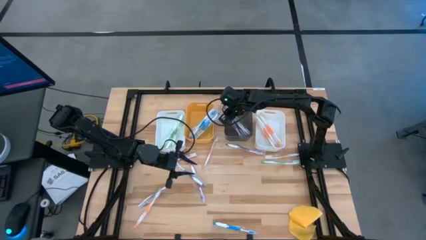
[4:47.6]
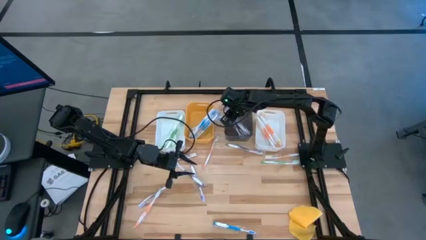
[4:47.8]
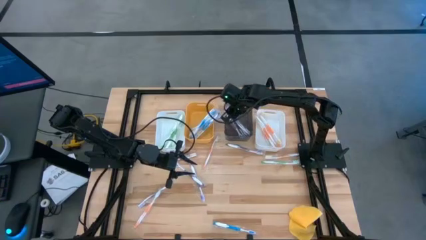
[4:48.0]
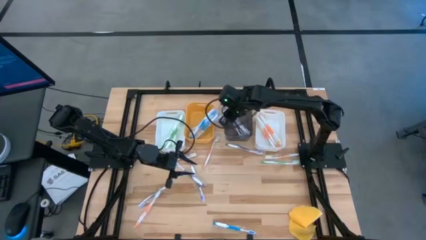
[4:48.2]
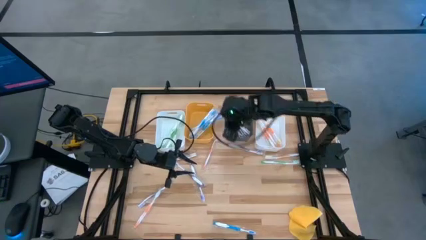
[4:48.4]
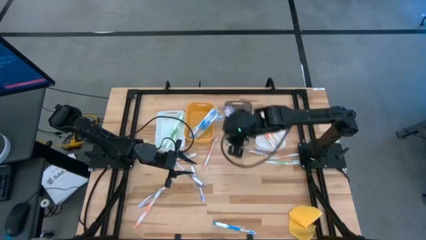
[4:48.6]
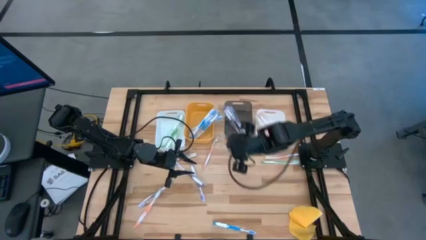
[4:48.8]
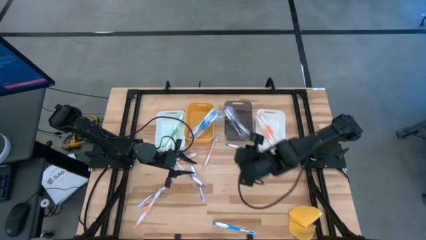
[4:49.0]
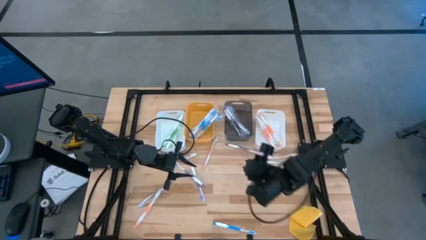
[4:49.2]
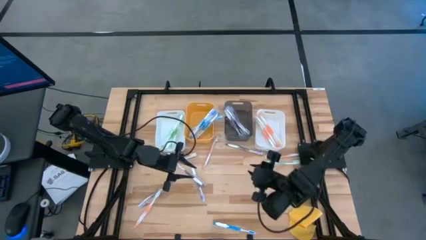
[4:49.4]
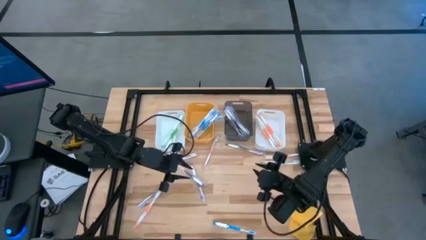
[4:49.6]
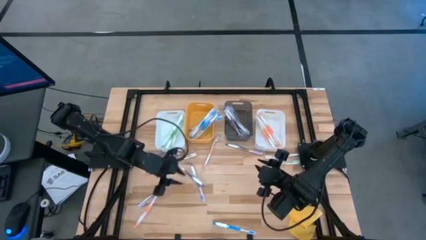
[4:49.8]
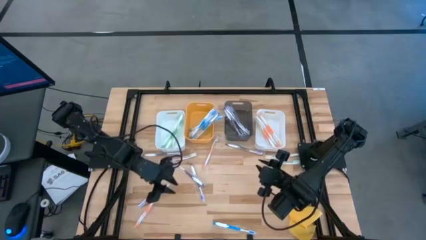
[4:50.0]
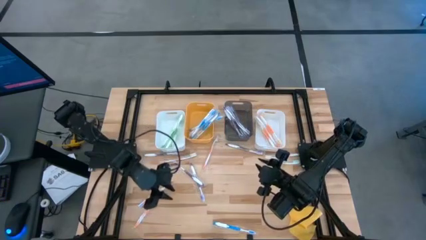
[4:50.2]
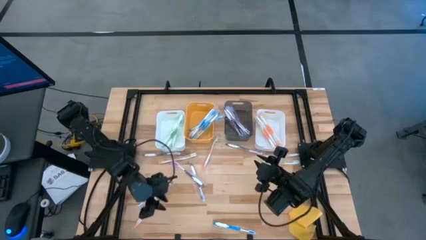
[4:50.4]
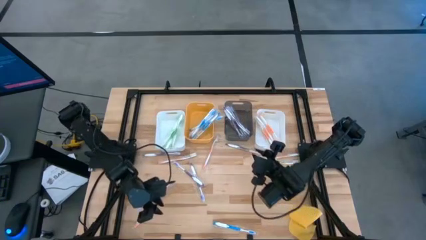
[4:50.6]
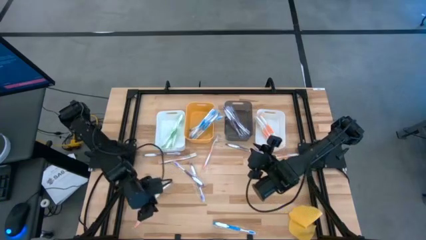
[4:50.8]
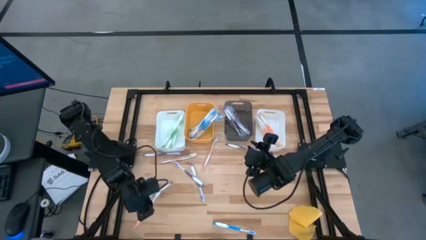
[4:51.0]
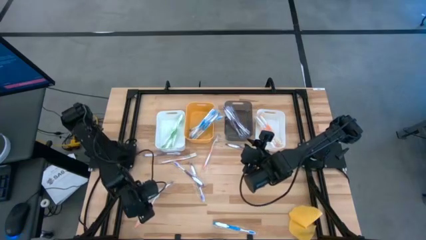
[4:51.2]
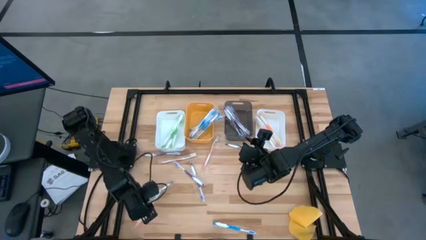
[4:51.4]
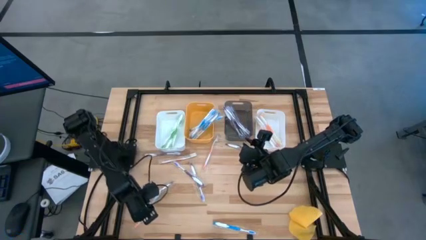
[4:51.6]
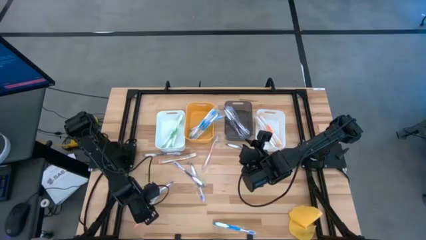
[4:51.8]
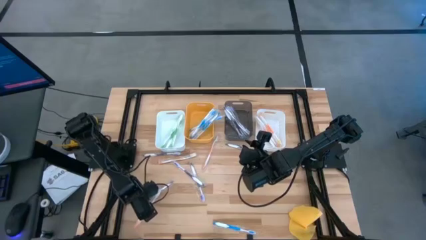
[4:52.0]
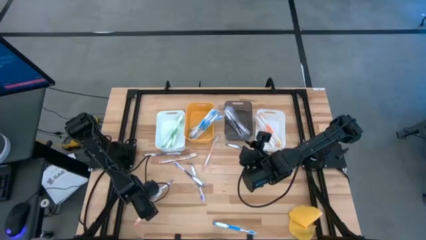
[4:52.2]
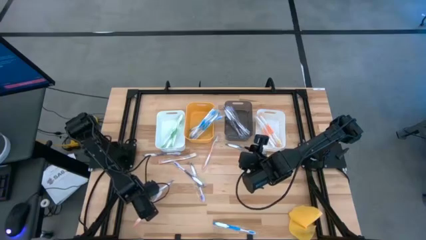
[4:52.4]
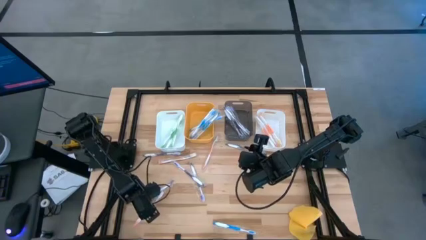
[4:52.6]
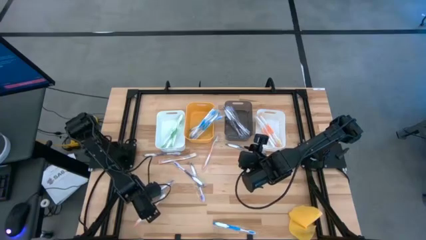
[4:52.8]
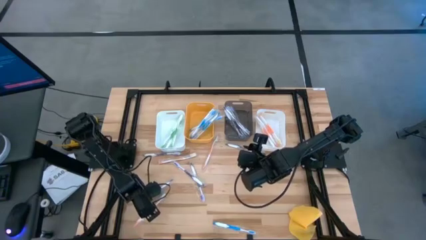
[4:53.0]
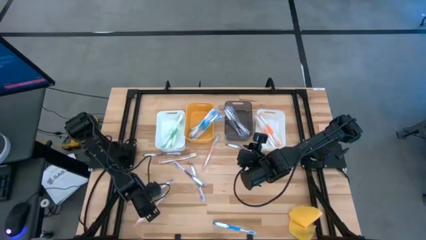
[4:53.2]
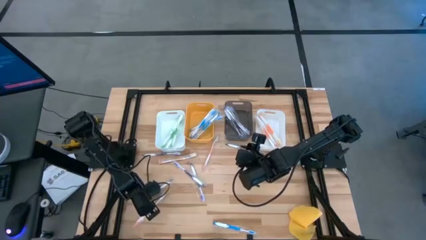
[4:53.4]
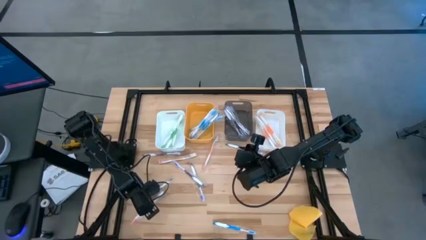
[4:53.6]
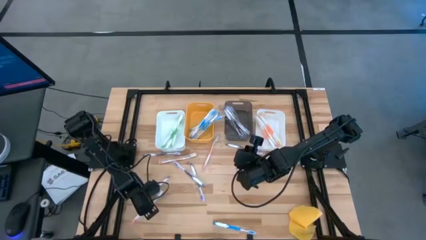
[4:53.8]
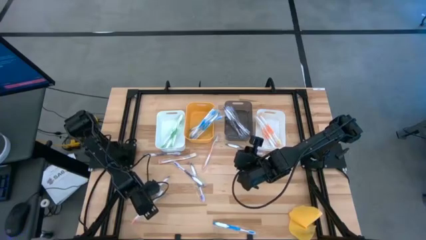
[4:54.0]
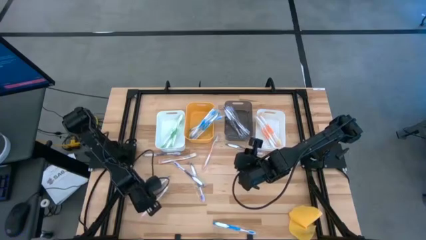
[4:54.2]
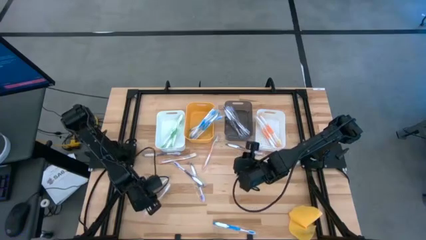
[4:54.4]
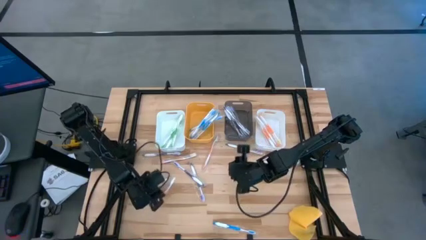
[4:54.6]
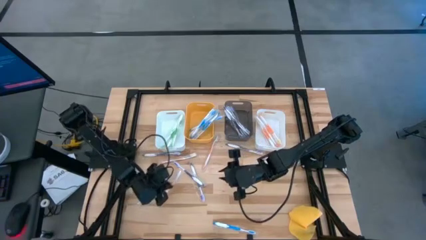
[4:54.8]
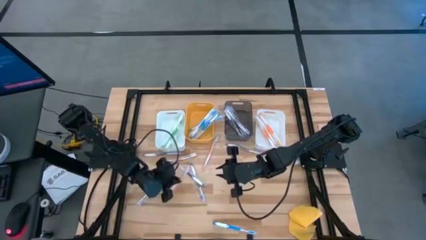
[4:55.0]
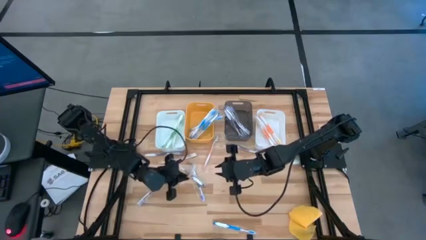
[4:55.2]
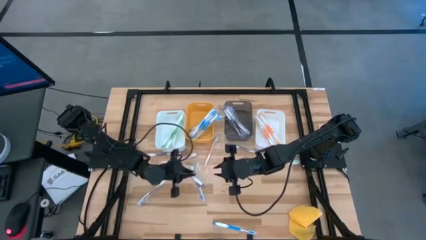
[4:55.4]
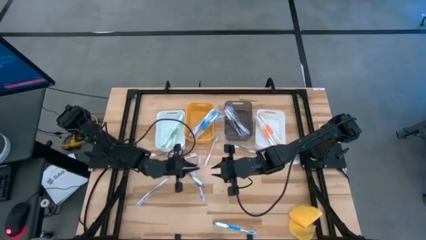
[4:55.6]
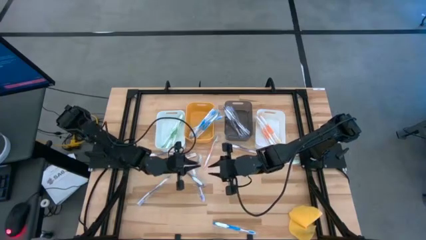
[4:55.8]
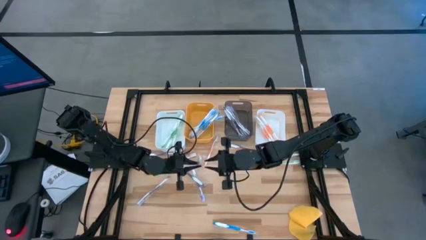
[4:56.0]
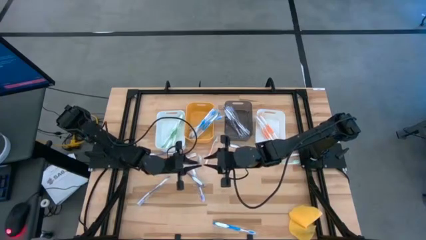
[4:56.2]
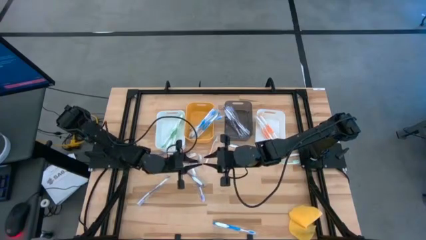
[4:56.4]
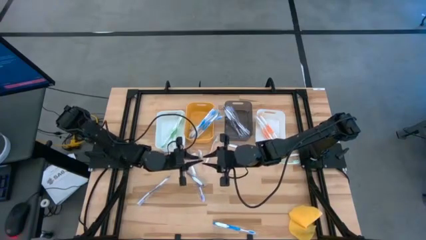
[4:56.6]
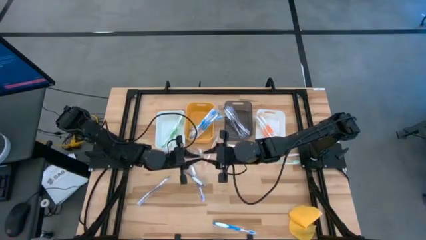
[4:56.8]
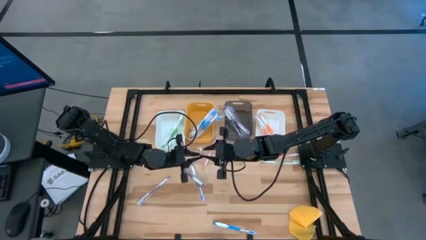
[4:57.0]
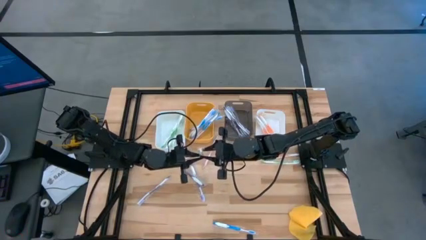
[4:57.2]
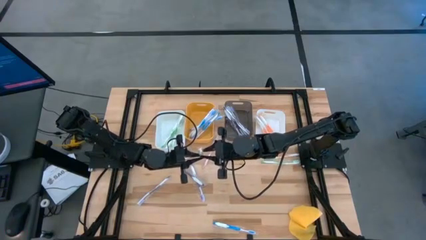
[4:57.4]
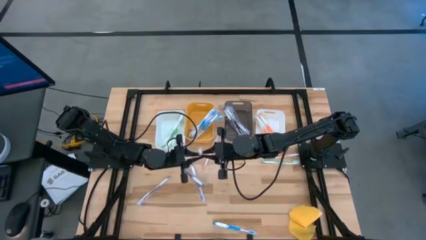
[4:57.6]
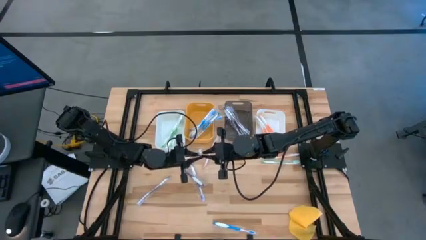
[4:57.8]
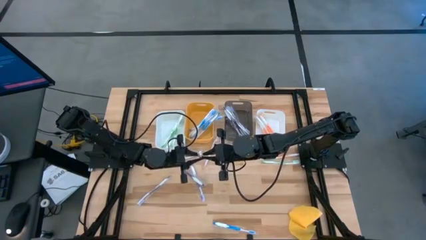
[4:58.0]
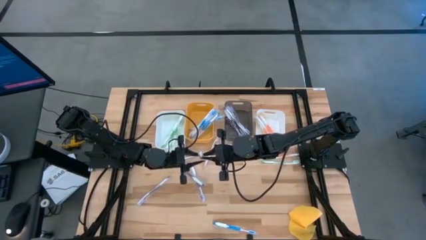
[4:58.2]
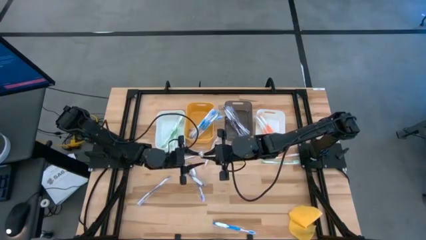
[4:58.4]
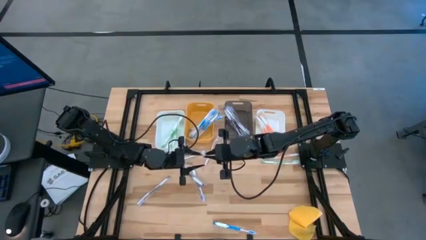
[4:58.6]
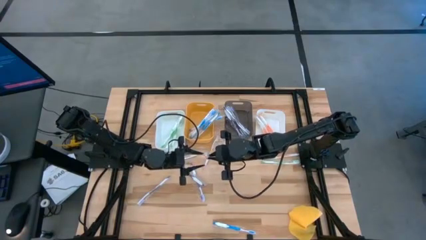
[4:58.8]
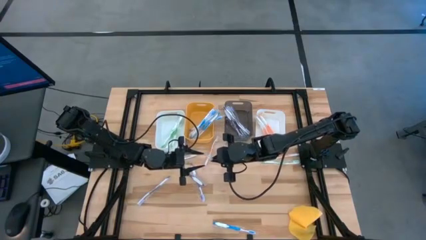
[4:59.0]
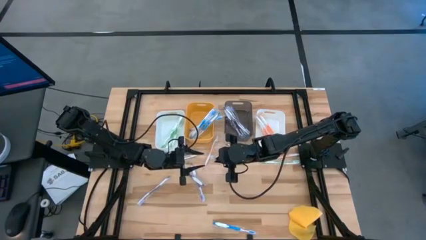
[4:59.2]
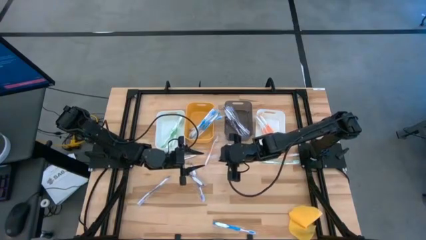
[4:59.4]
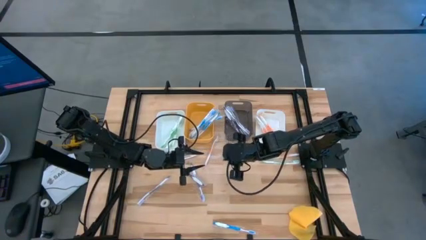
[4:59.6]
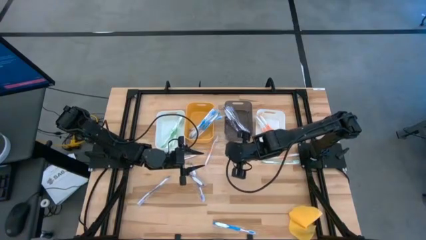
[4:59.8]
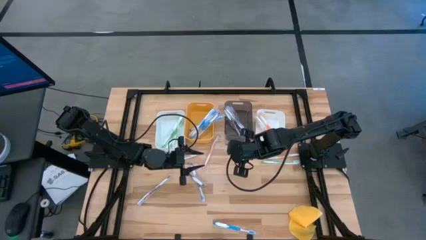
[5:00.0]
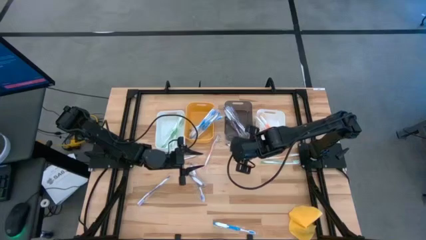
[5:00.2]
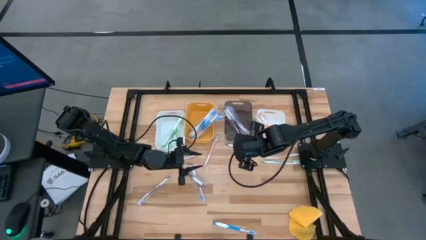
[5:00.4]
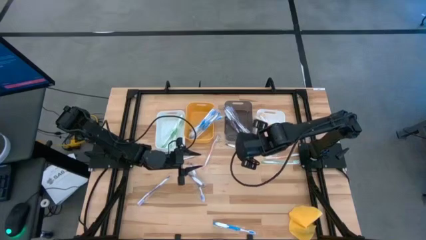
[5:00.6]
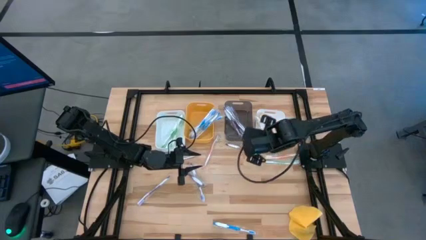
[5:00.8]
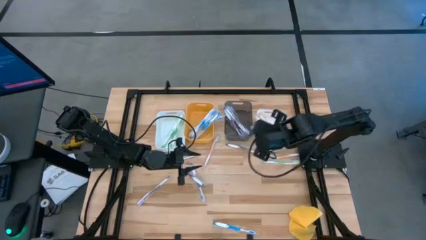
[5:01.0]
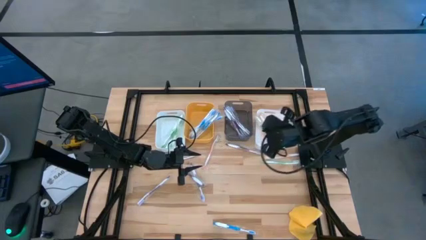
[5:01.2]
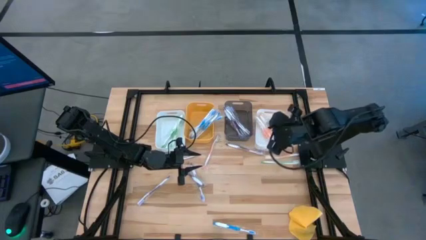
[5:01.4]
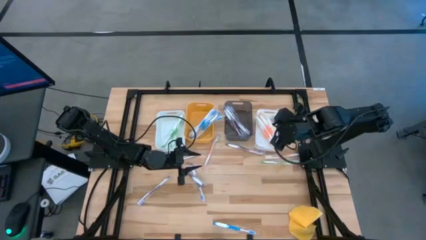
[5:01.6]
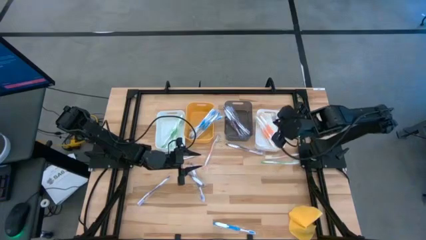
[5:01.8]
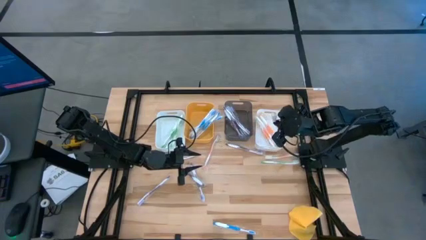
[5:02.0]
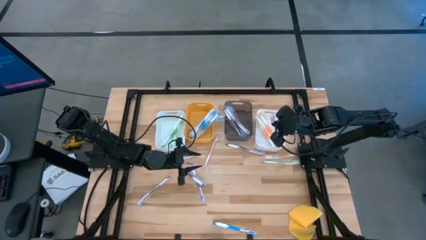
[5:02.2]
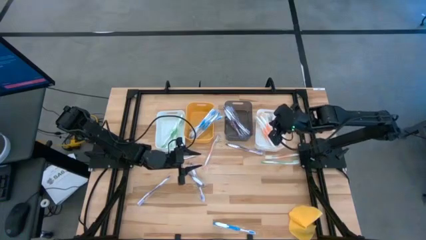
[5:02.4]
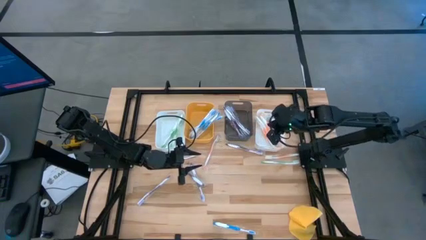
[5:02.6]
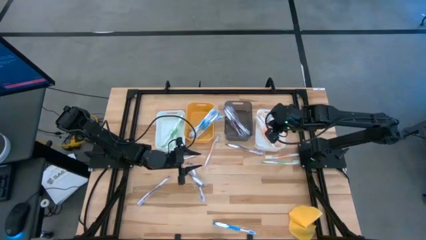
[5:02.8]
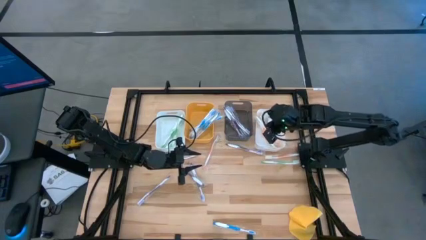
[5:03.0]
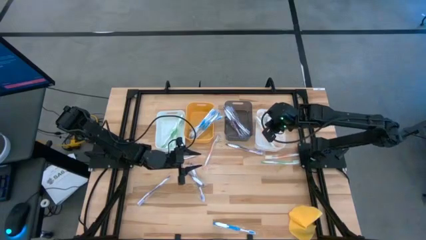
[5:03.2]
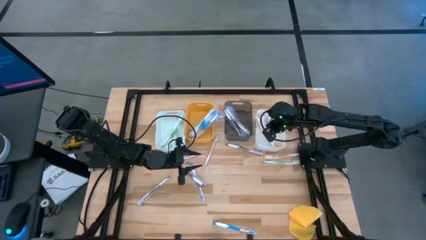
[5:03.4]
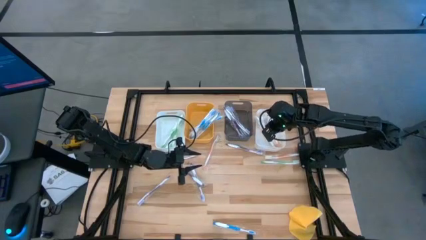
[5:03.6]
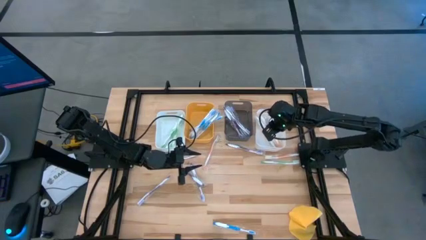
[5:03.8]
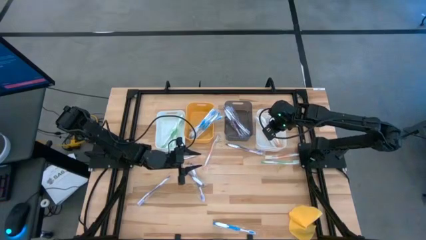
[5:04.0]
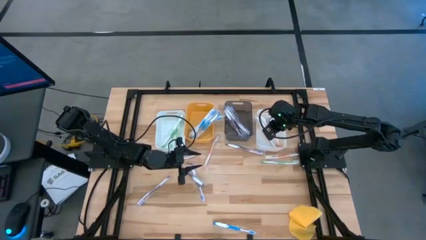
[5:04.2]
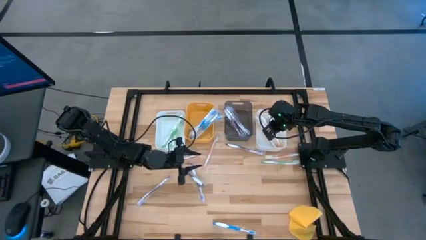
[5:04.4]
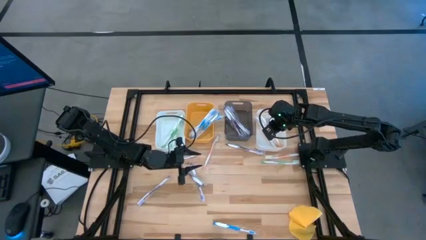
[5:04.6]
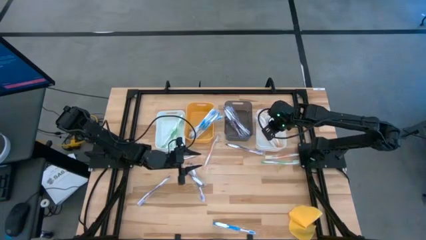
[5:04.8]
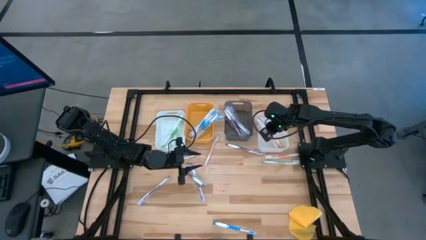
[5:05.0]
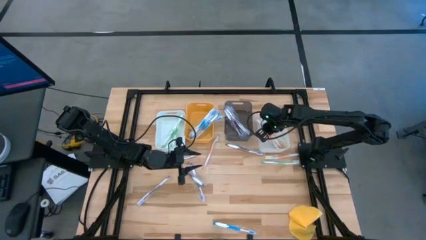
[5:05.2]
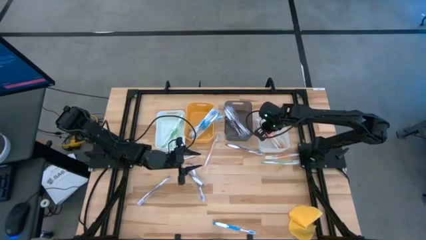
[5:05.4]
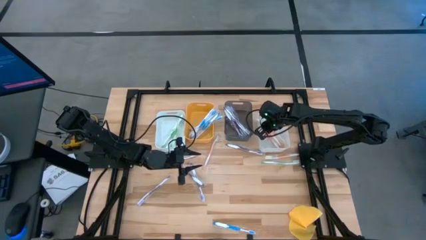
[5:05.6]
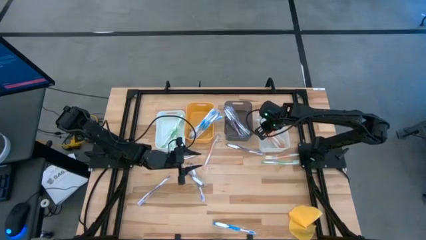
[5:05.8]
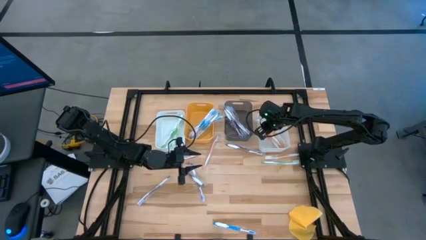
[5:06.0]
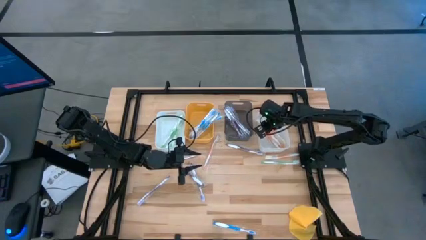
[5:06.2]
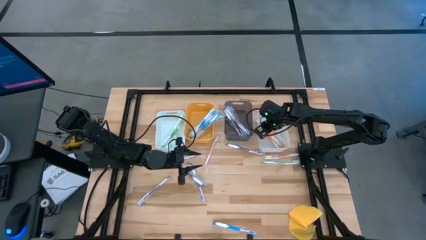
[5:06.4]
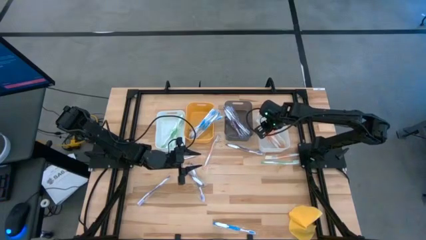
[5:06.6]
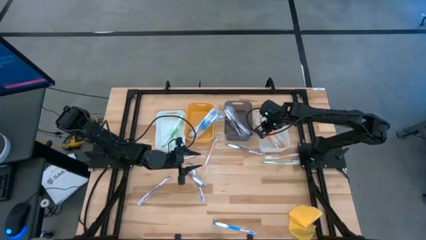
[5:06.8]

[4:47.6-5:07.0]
Task: Pick & Place Toothbrushes
Put the orange toothbrush into the right white bin
